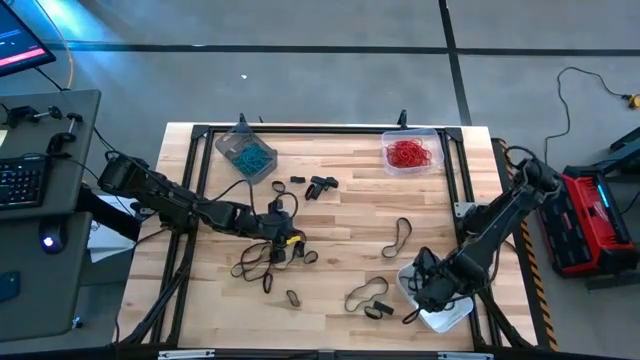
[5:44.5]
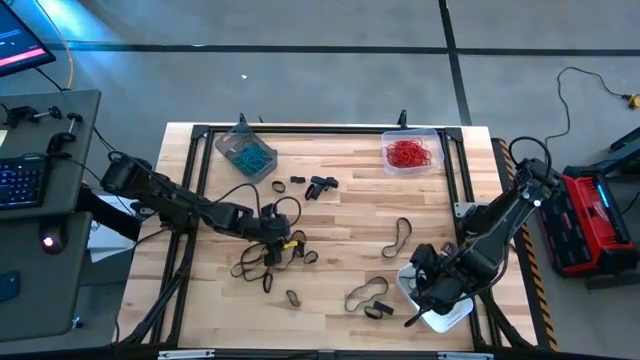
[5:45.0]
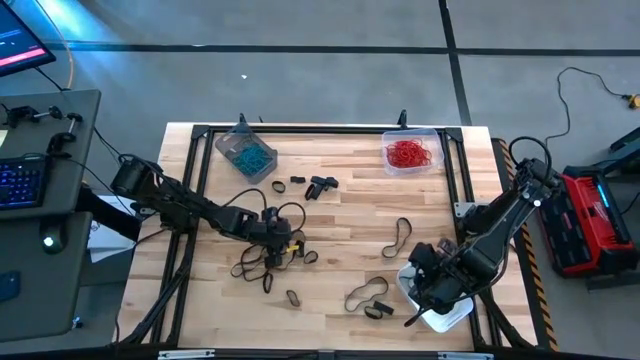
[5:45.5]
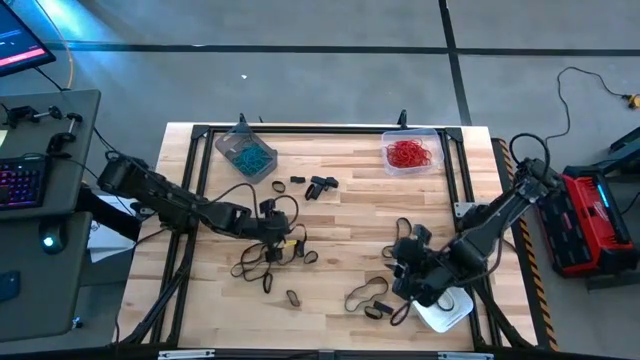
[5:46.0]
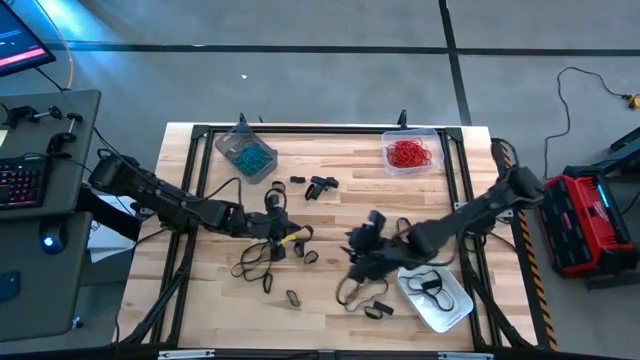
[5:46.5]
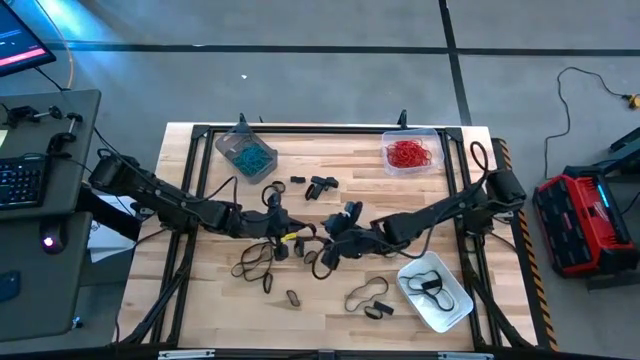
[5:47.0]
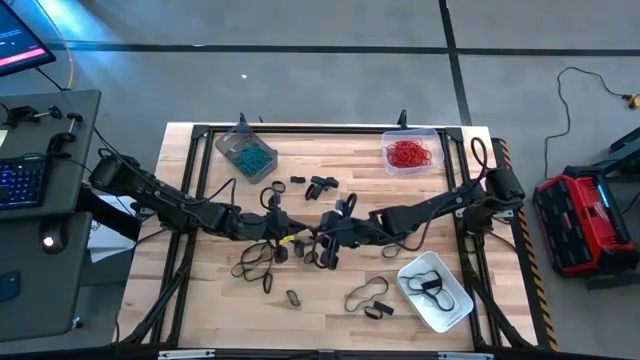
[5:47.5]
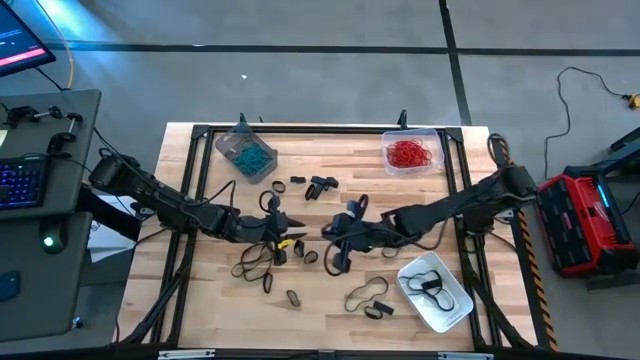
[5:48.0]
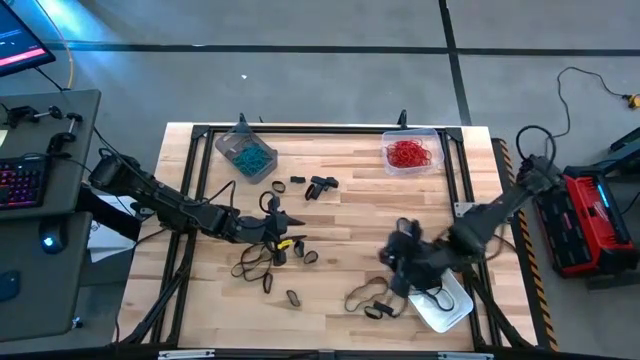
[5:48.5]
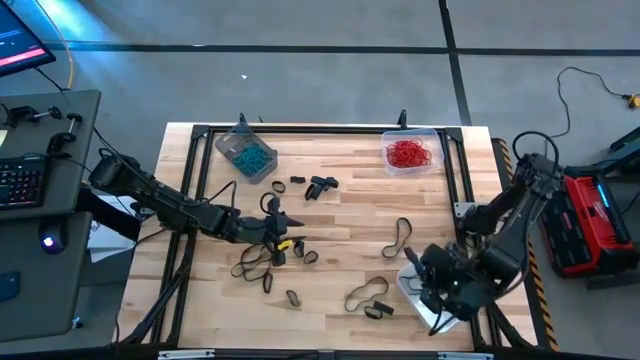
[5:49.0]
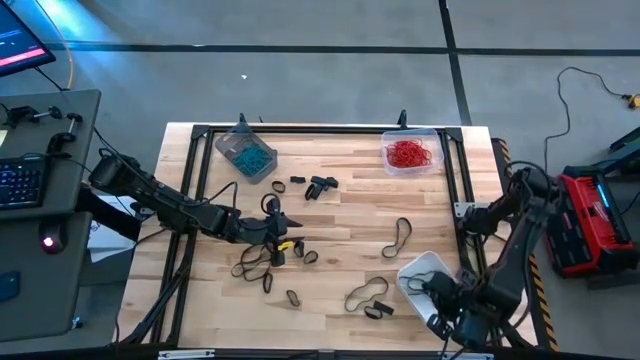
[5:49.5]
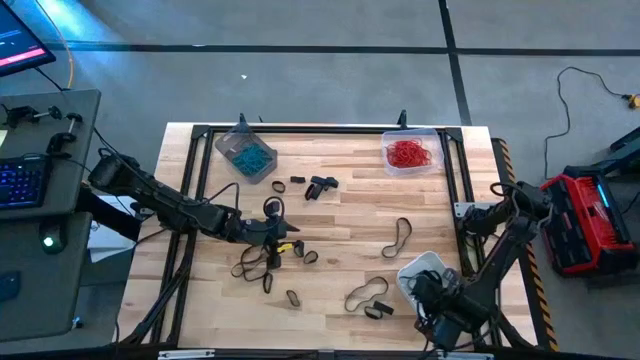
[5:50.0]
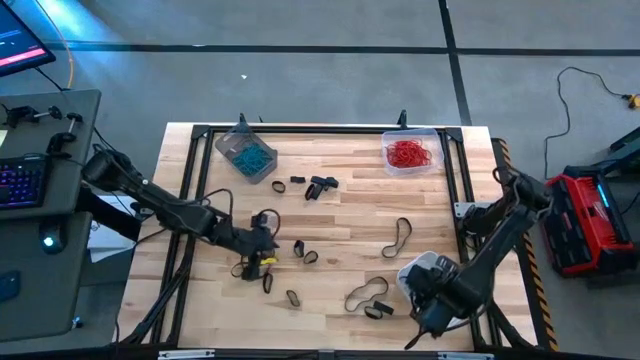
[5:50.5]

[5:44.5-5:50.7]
Task: Sort rubber bands into baskets
Put the black rubber band into the white bin

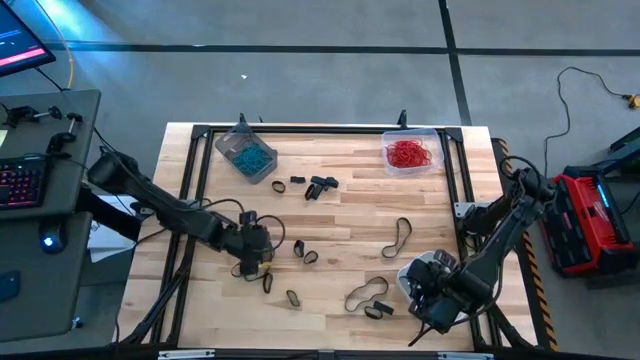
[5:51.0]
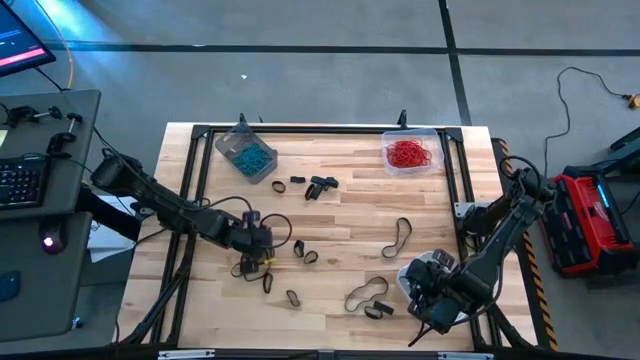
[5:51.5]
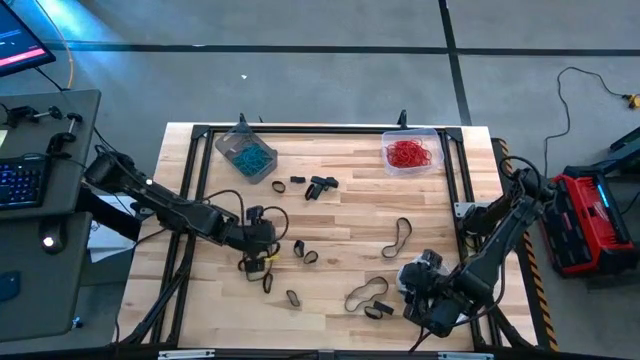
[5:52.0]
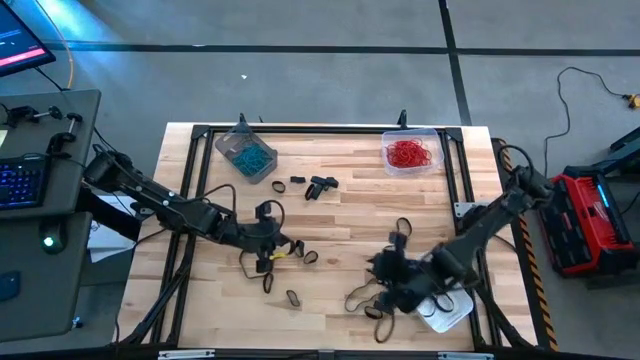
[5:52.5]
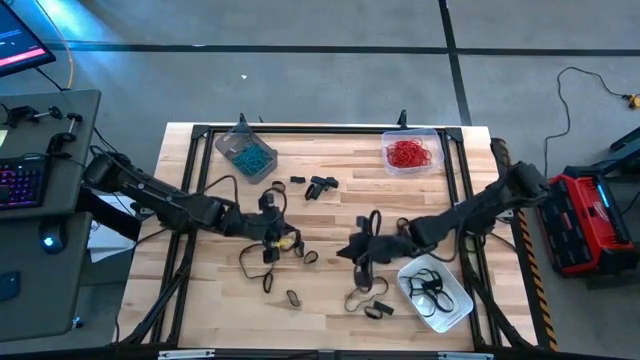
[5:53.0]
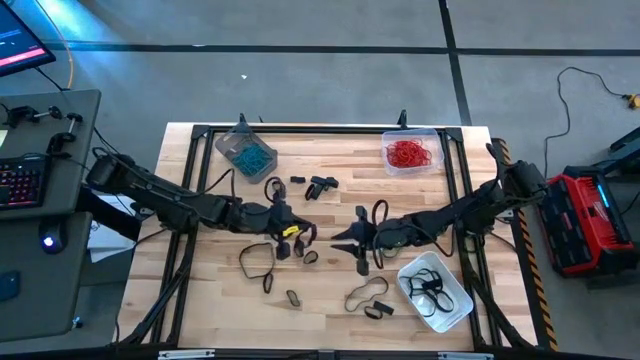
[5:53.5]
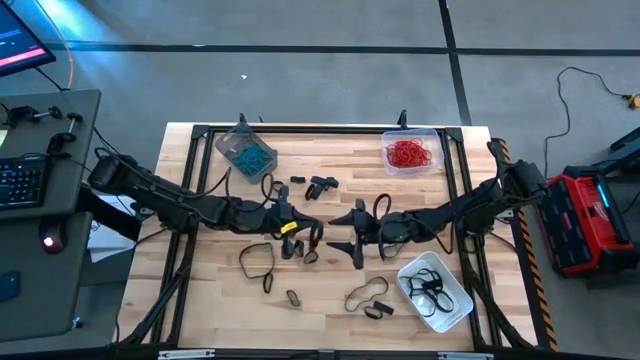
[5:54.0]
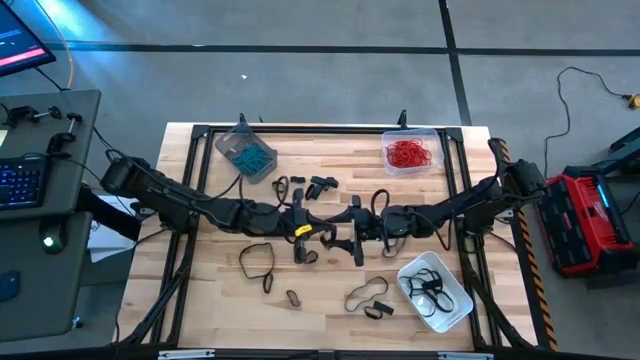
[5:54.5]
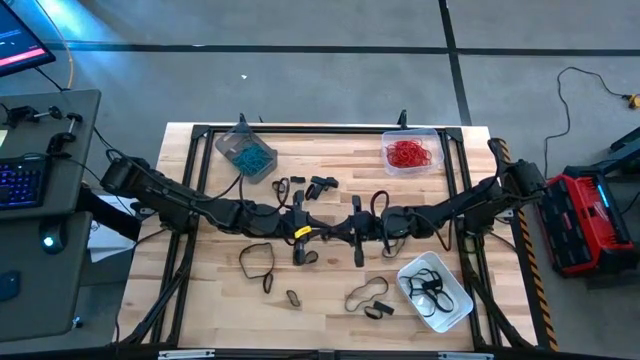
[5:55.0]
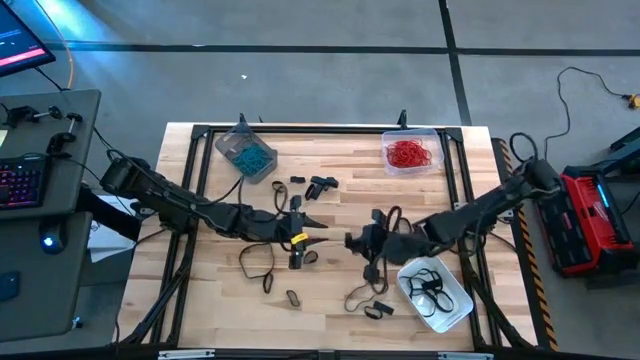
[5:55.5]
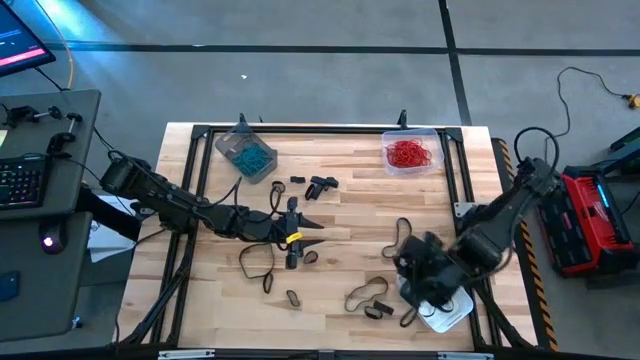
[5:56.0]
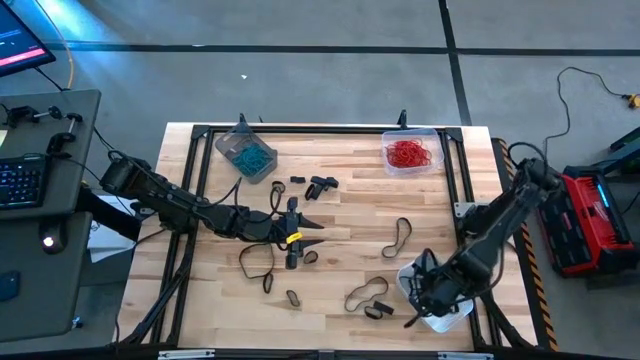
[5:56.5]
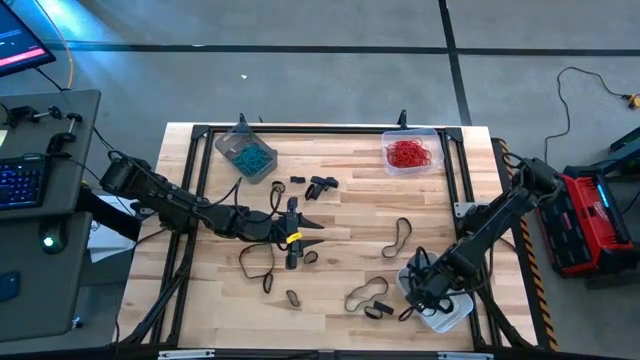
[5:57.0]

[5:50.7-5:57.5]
Put the black rubber band into the white bin

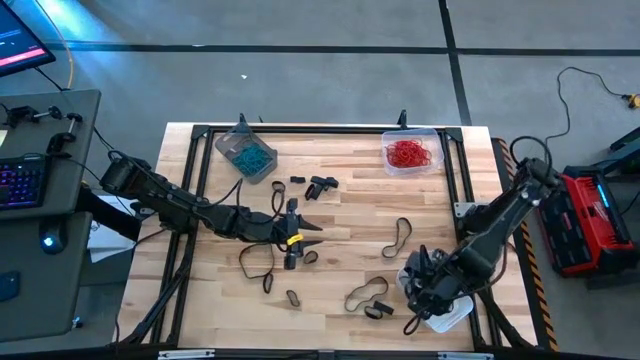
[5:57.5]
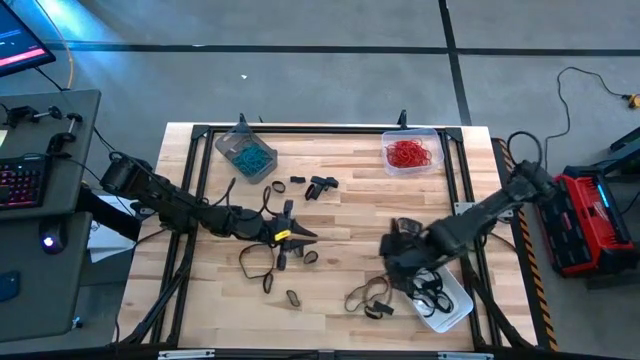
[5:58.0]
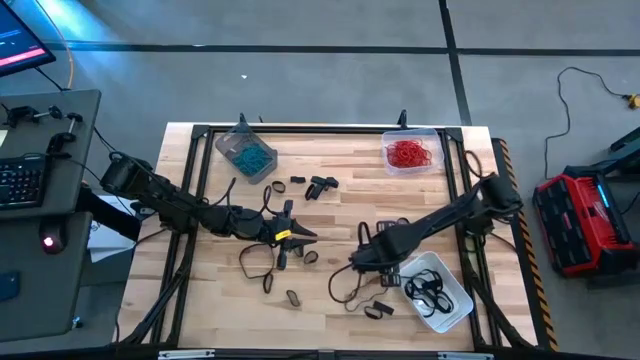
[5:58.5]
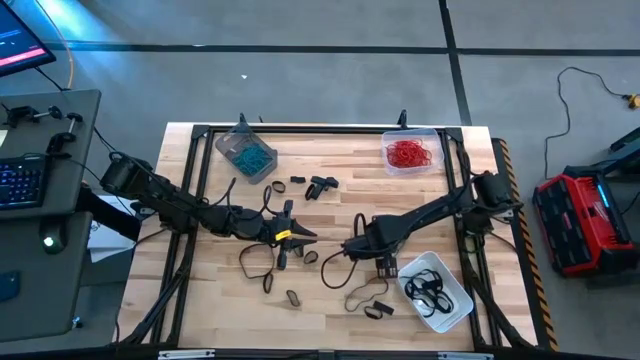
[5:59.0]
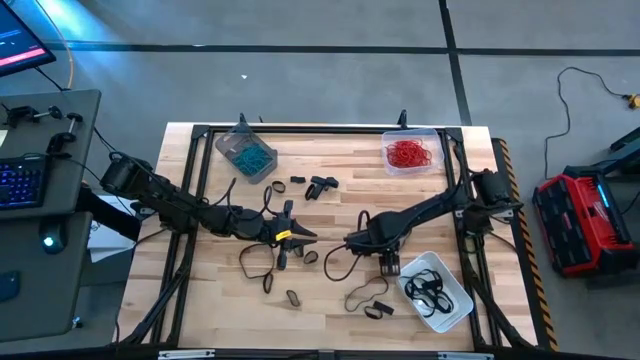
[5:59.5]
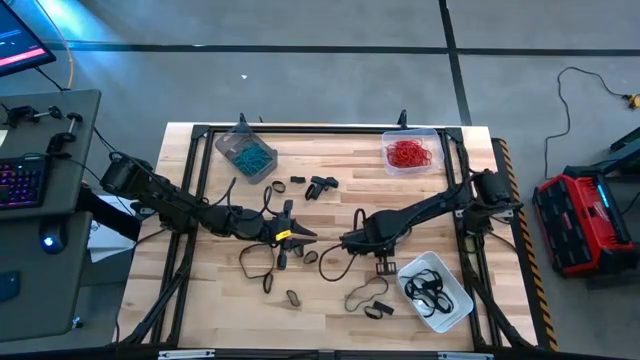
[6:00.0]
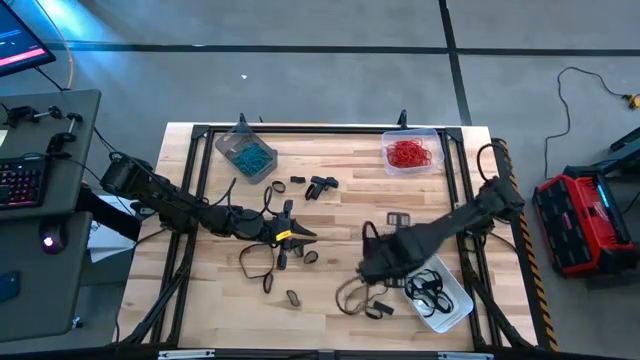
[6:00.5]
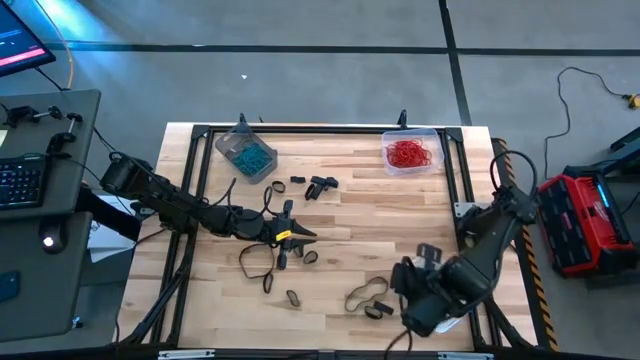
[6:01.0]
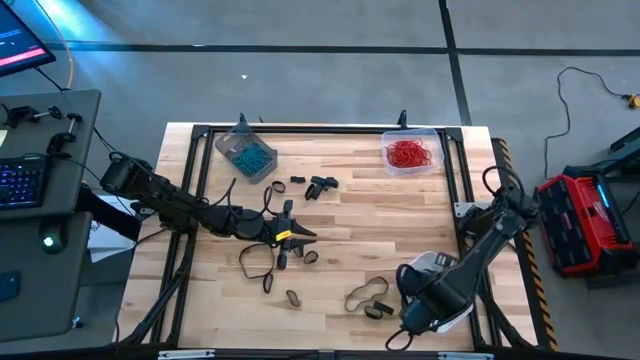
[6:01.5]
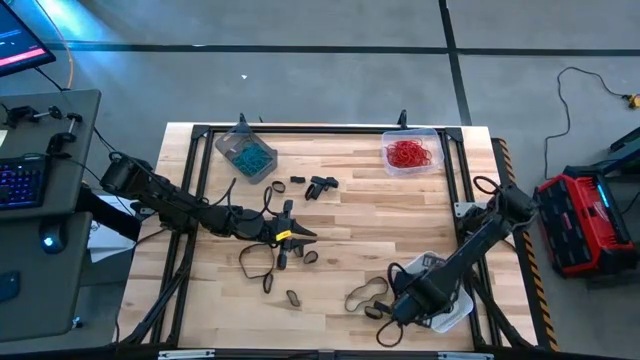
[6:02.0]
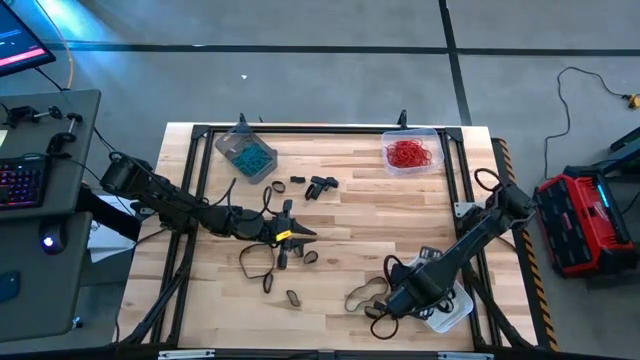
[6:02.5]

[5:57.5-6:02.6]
Put the black rubber band into the white bin

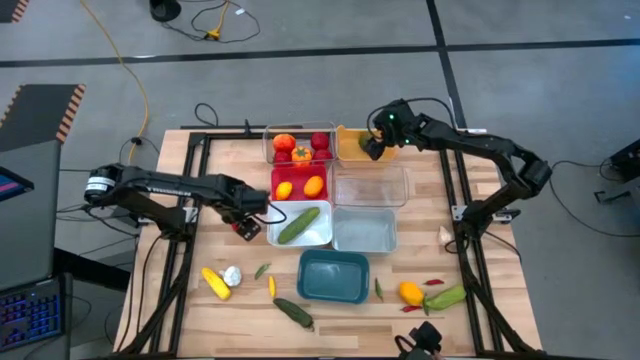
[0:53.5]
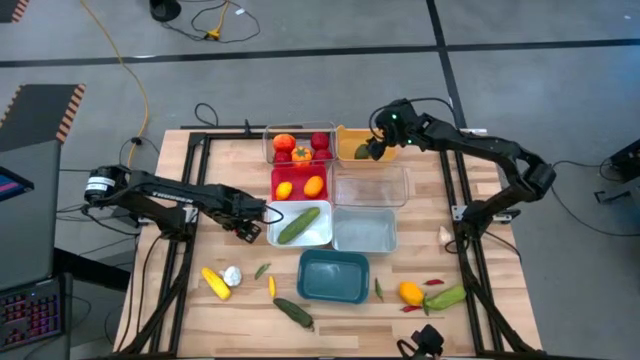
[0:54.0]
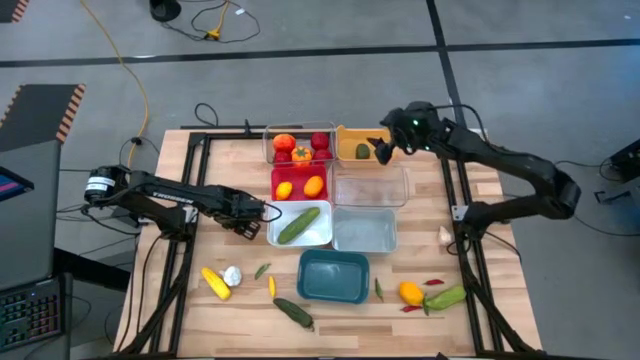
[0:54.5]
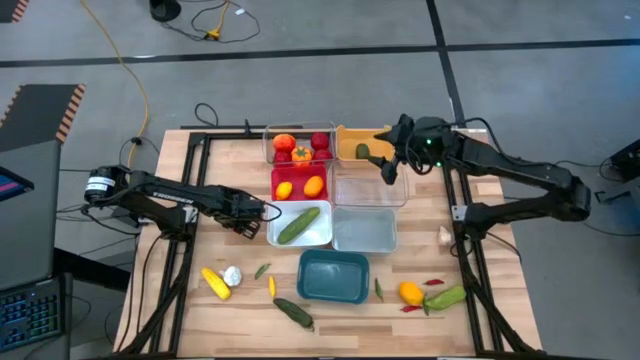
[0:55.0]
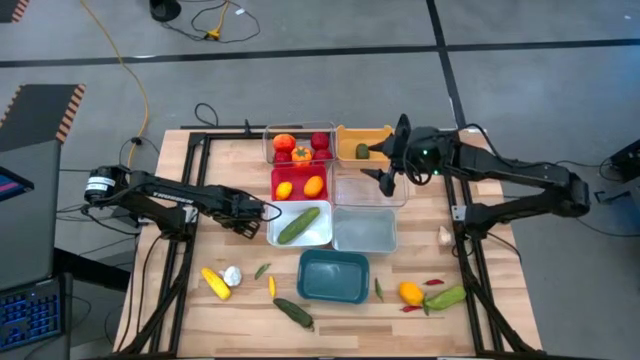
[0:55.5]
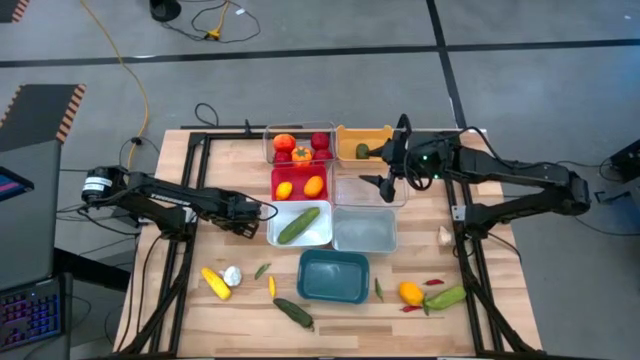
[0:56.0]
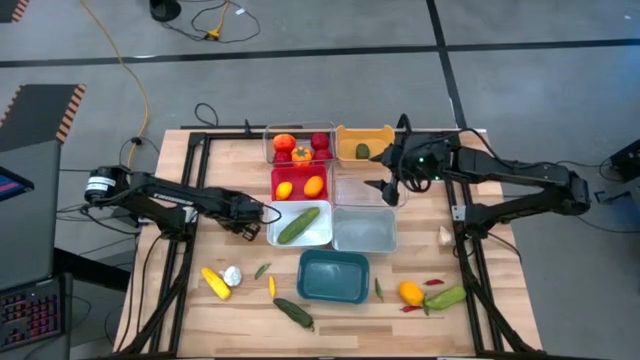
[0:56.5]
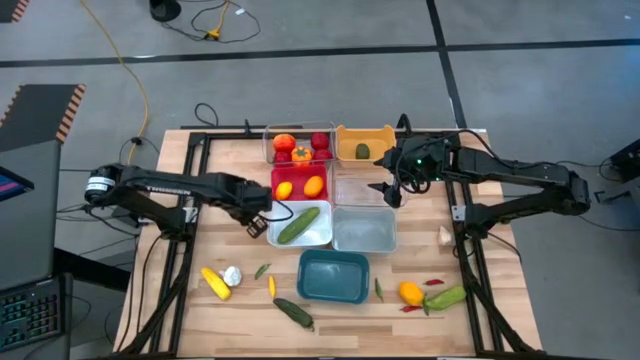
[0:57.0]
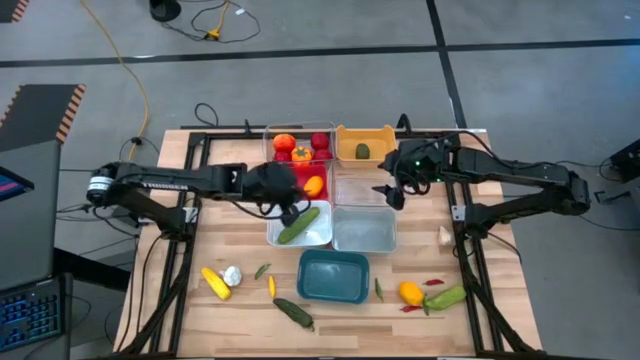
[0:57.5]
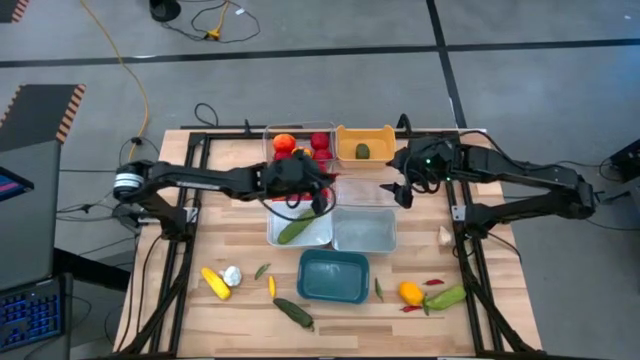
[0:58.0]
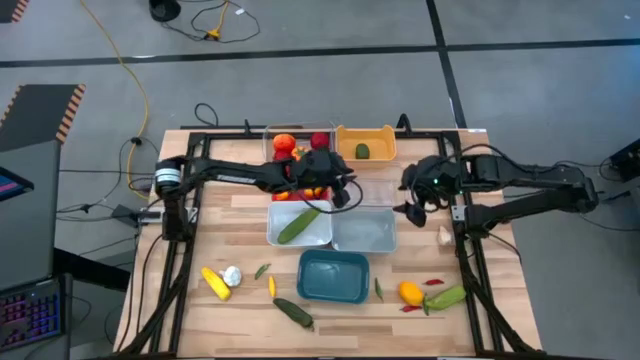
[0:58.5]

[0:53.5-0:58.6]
Task: Sort produce into baskets
Put the top red chili pepper into the bottom transparent bin
